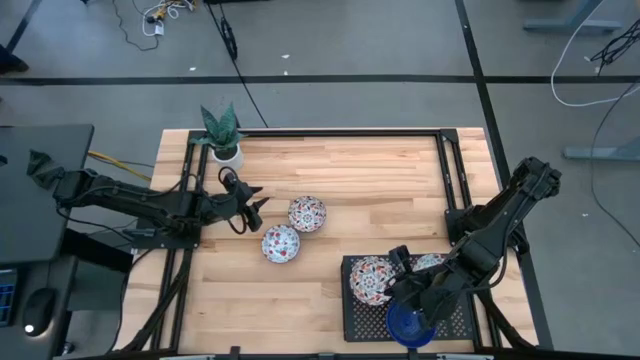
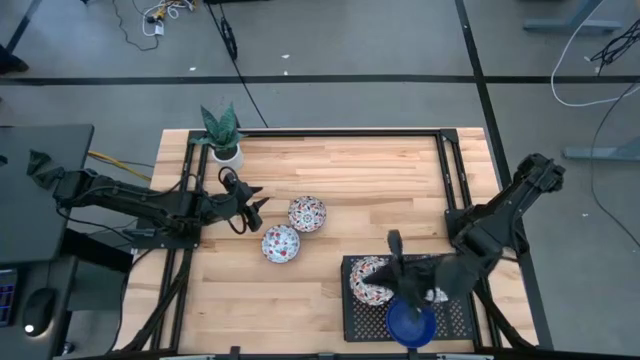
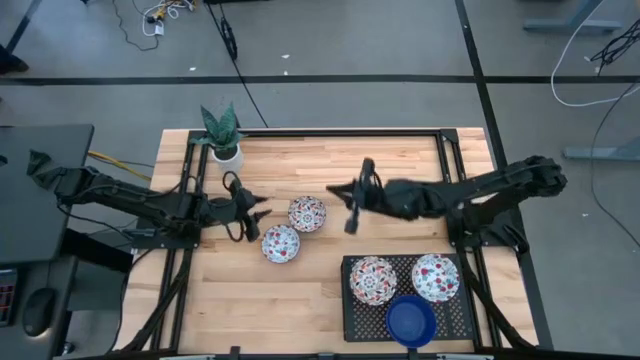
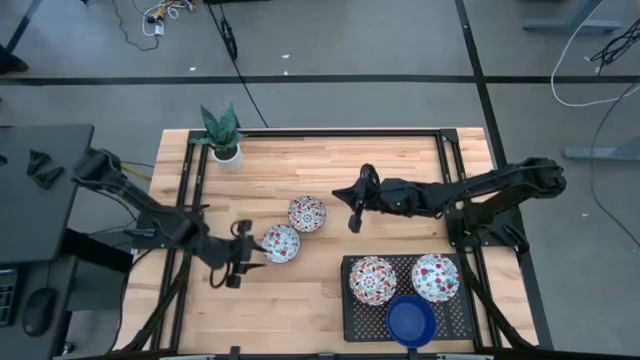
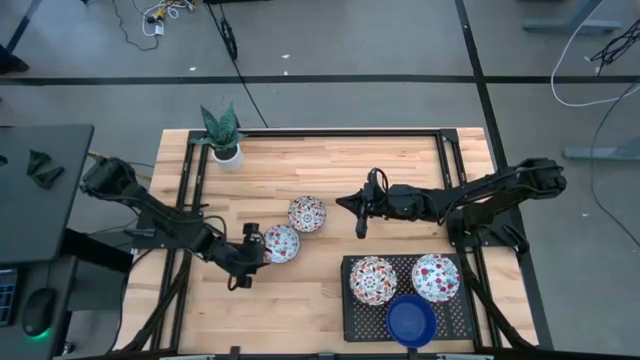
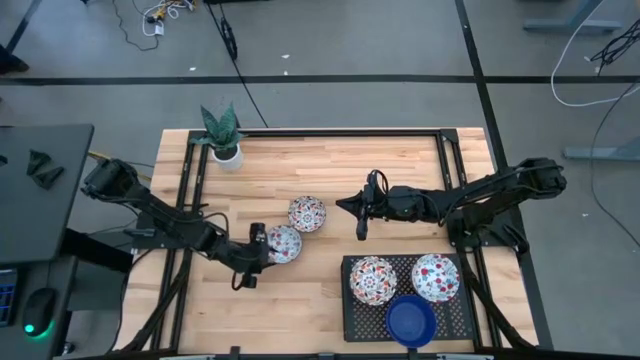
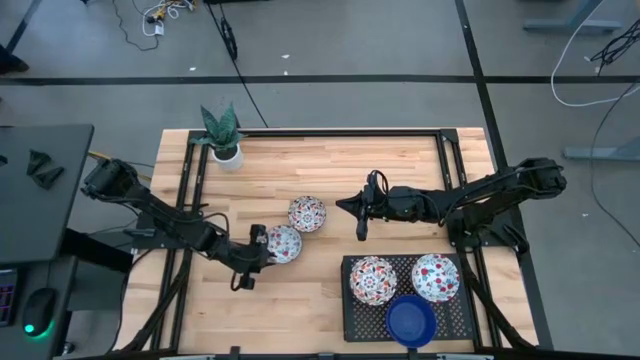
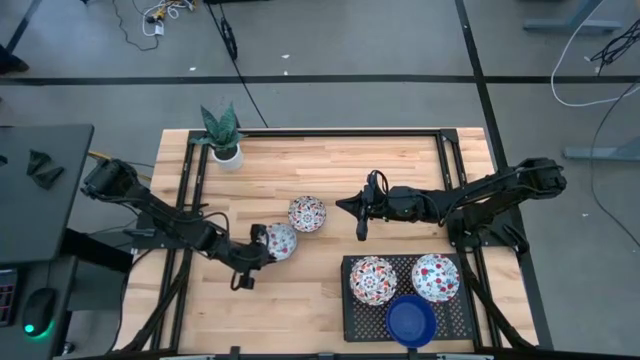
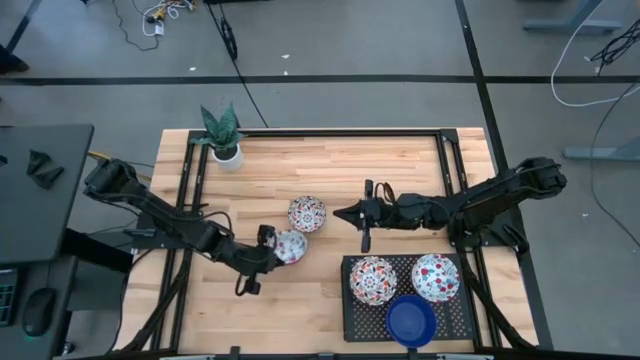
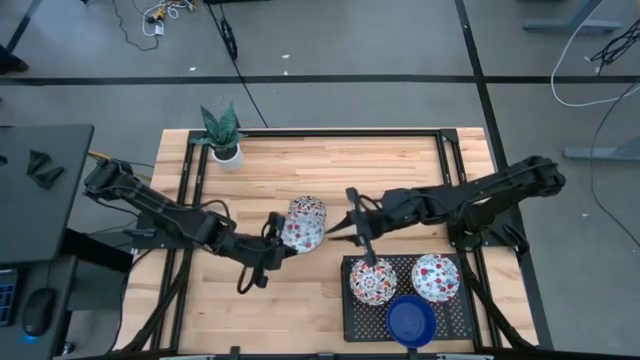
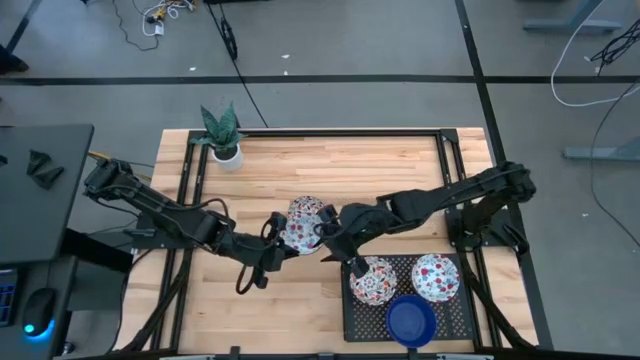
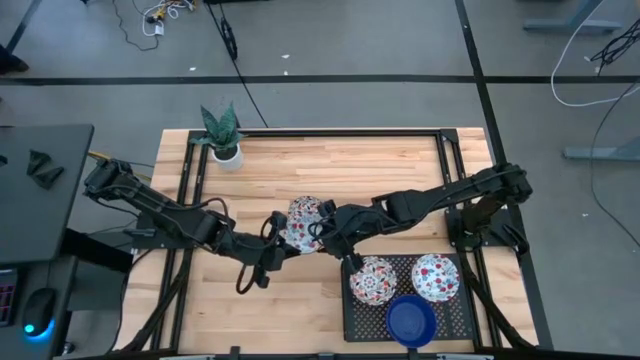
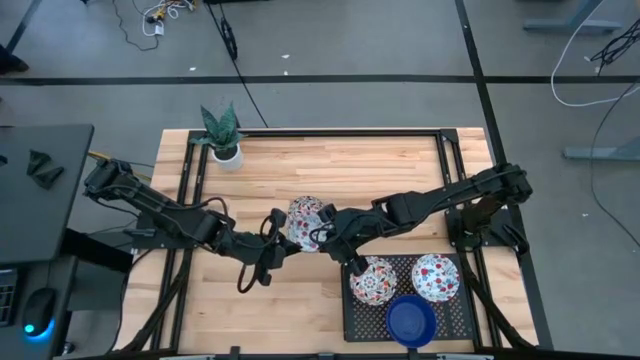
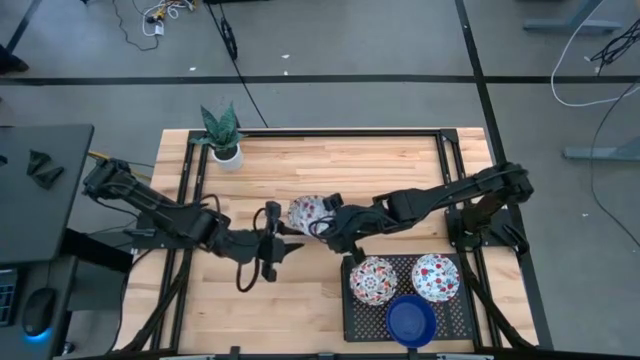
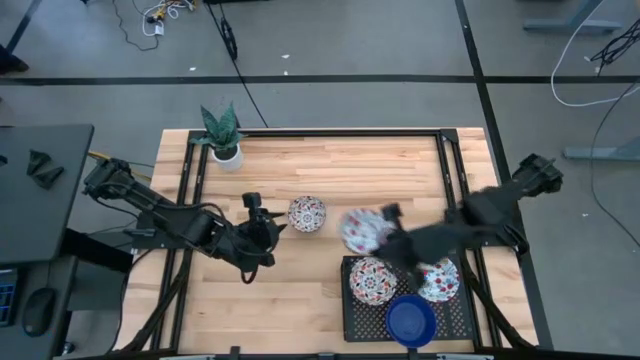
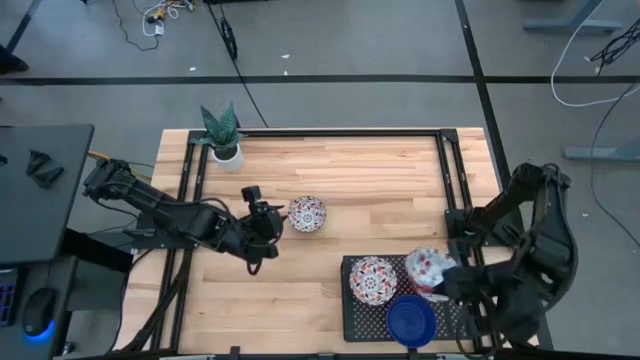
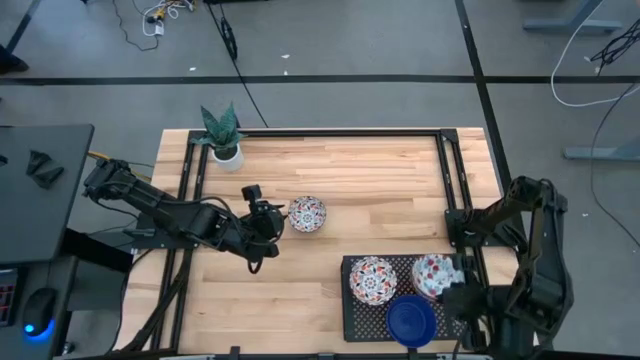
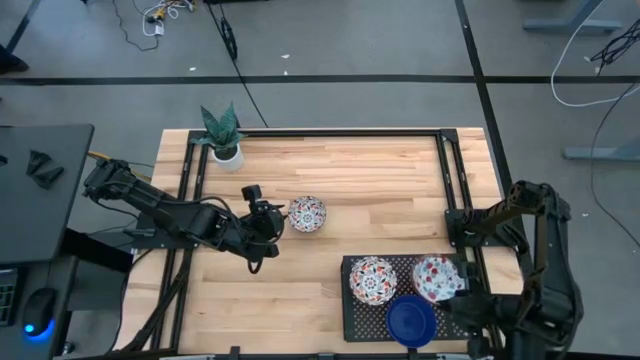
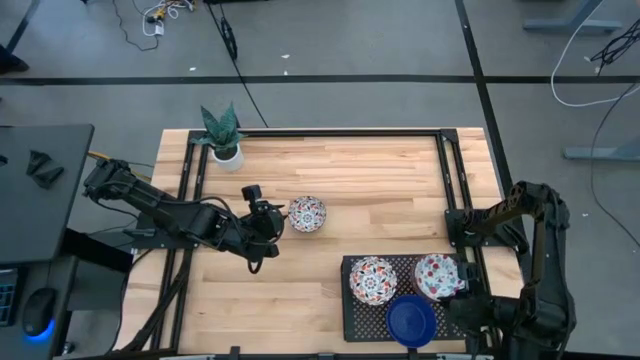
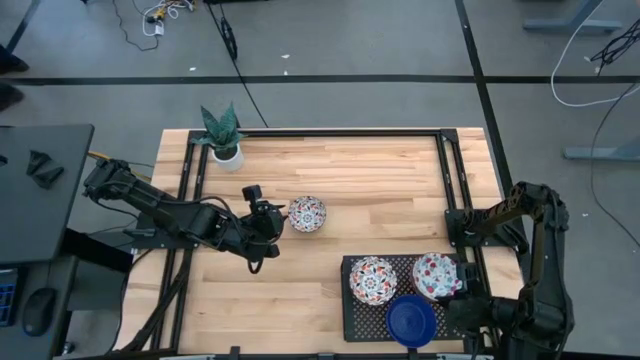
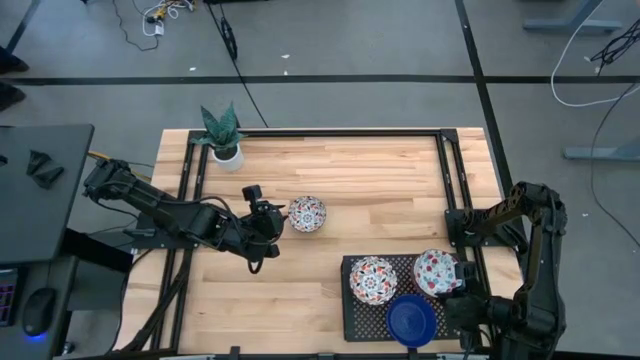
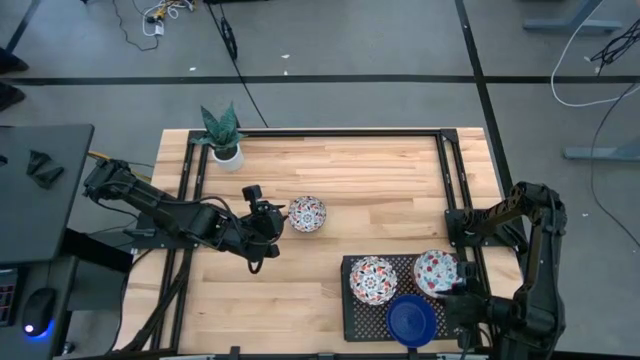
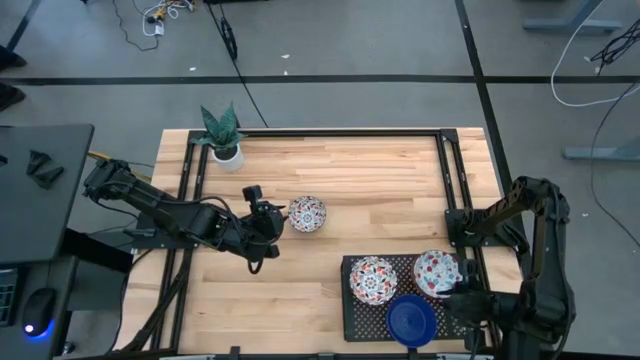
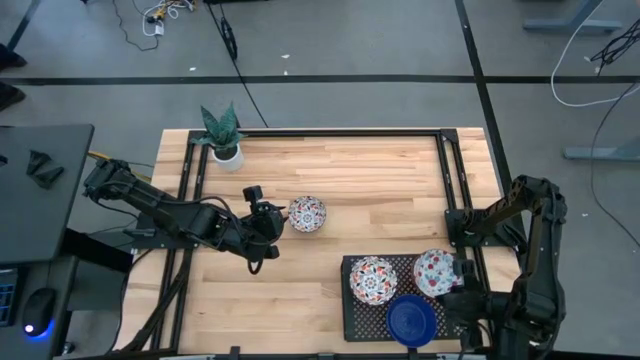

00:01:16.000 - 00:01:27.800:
Task: Pick & Place Mini bowls
Stack the white patterned bowl on top of the stacked white patterned bowl on the shelf

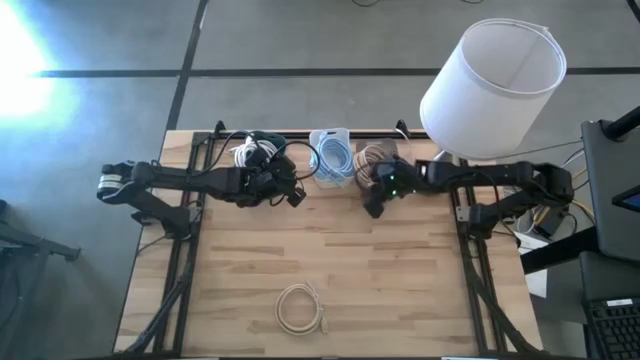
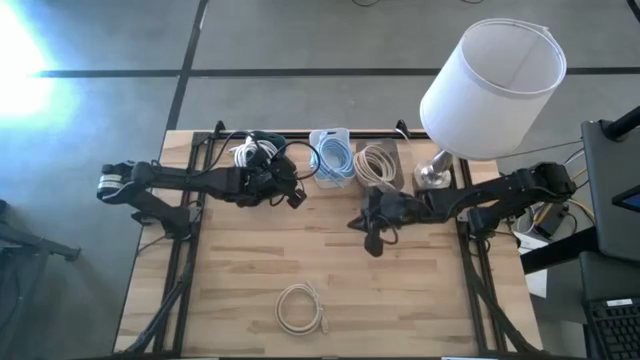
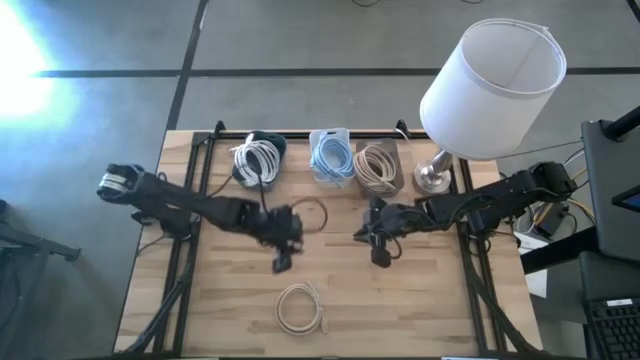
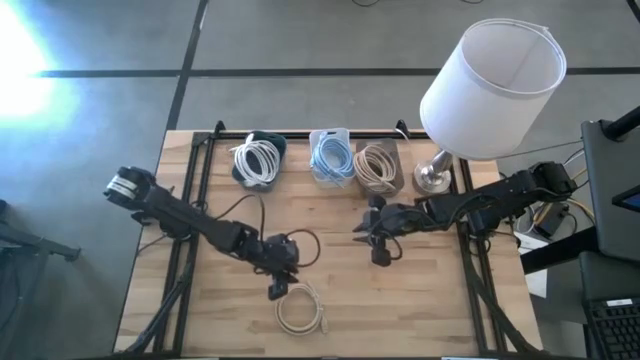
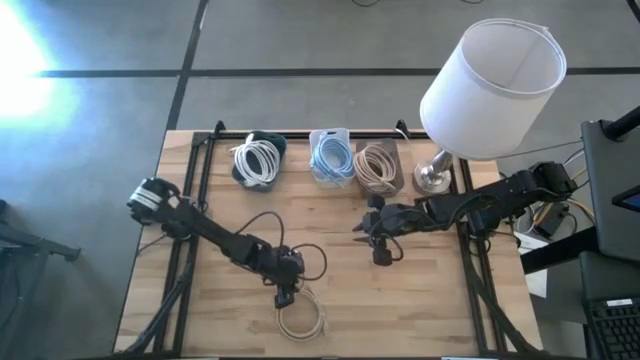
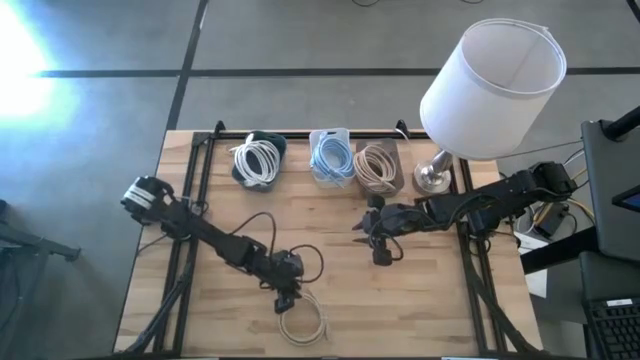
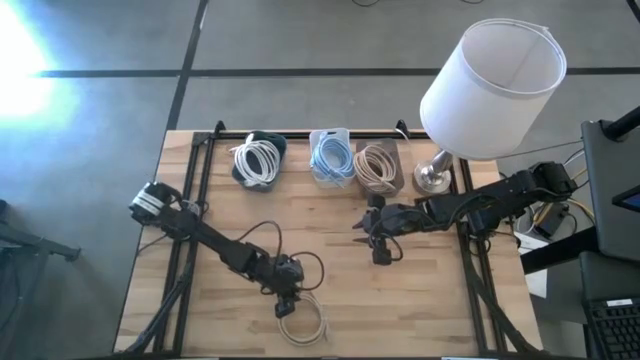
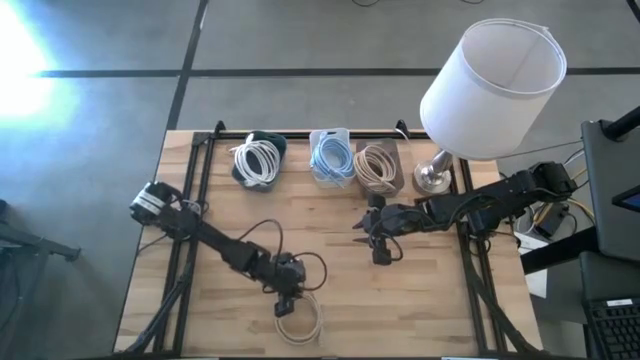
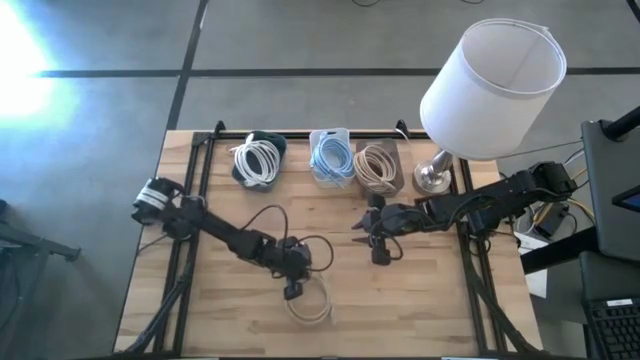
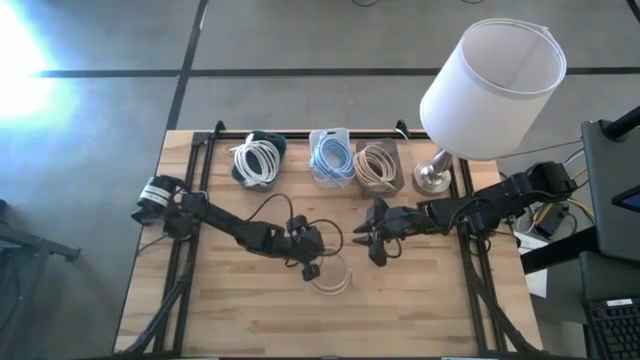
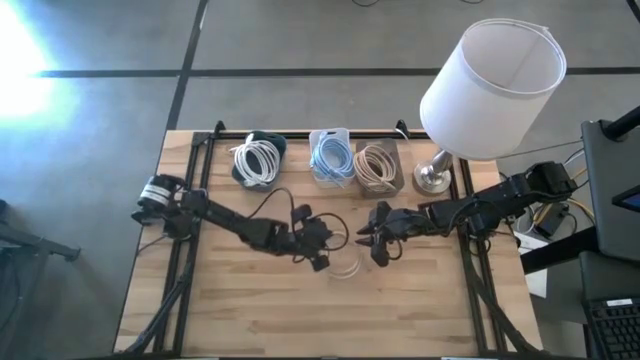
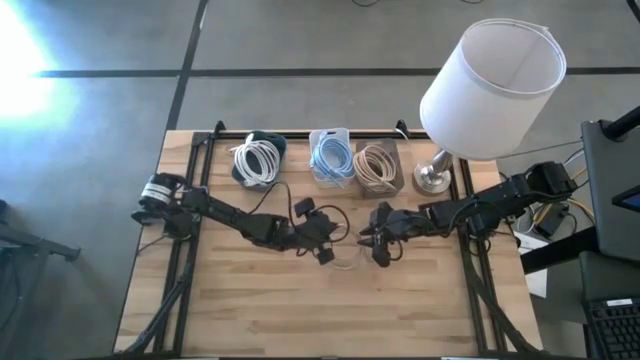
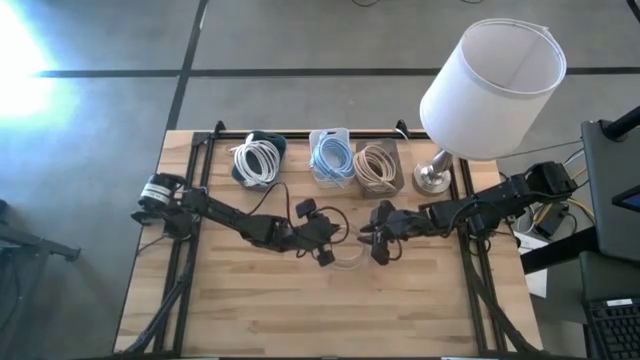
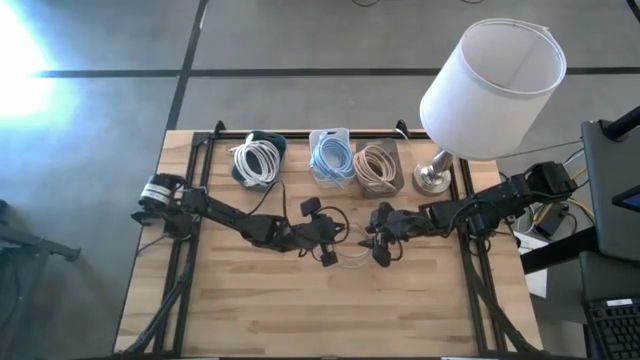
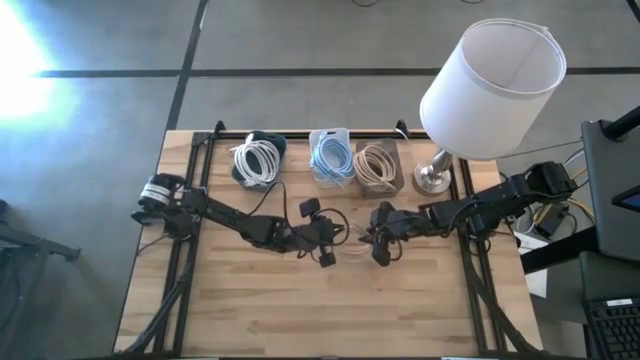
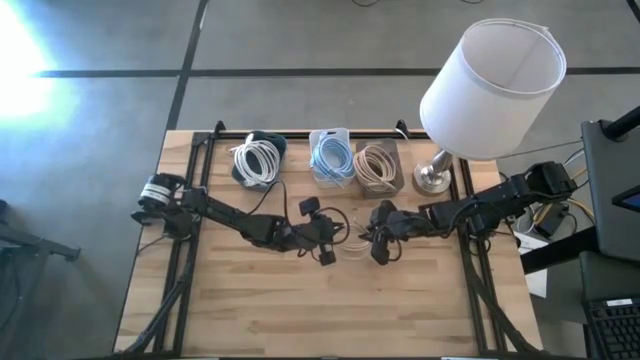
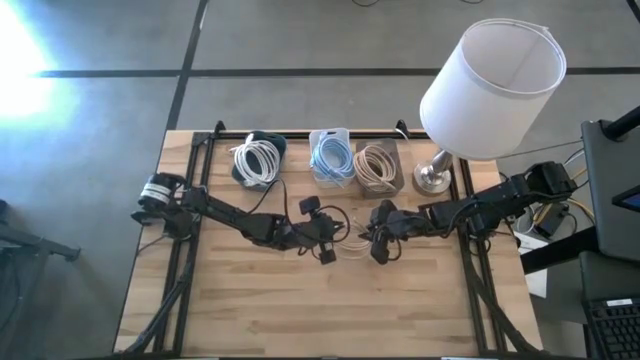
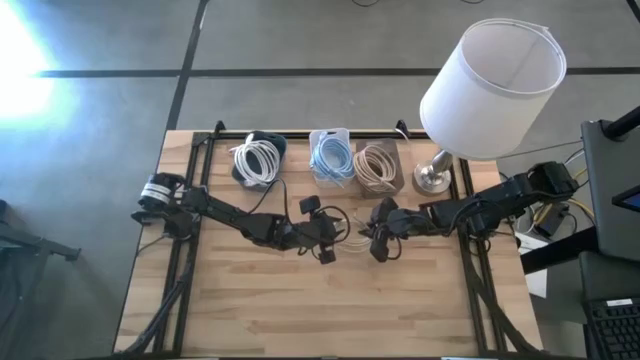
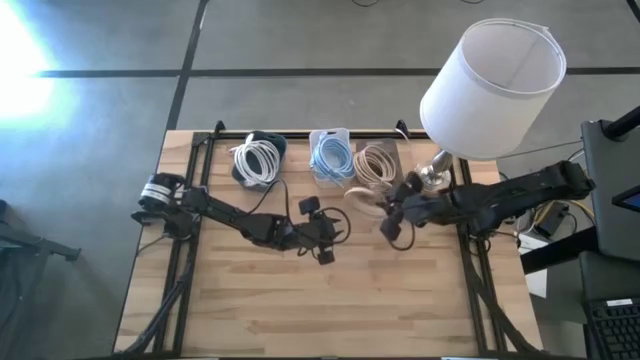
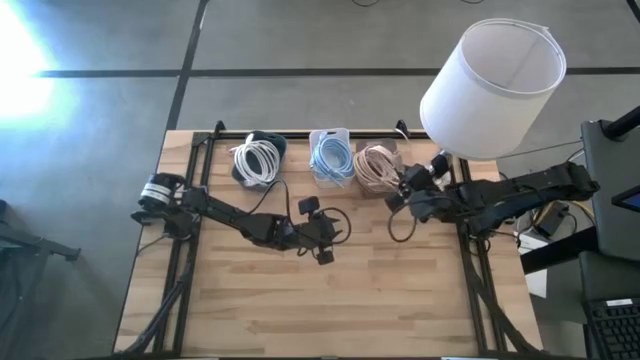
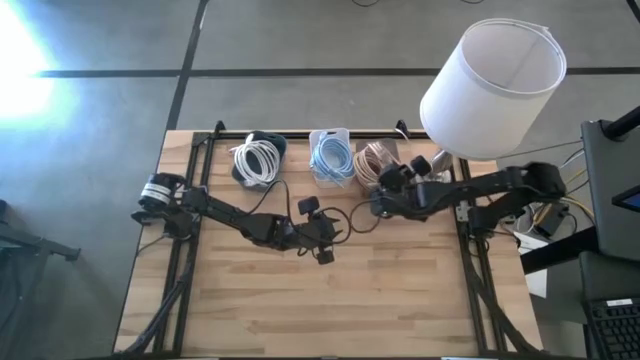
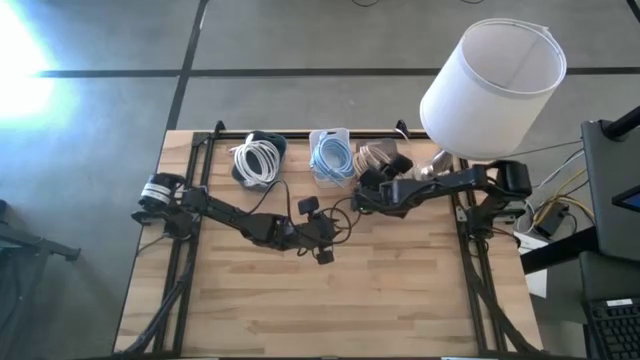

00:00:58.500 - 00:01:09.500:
Task: Sort HDMI cables
Put the brown HDMI cable into the black bin
